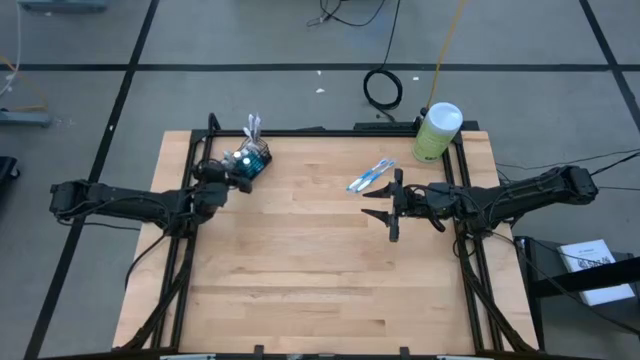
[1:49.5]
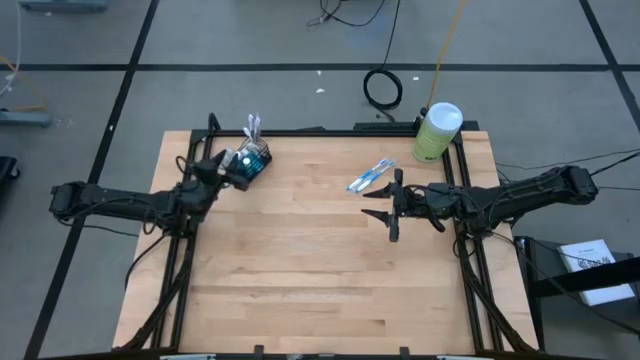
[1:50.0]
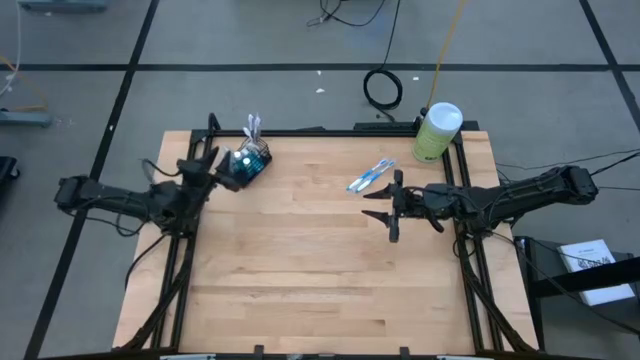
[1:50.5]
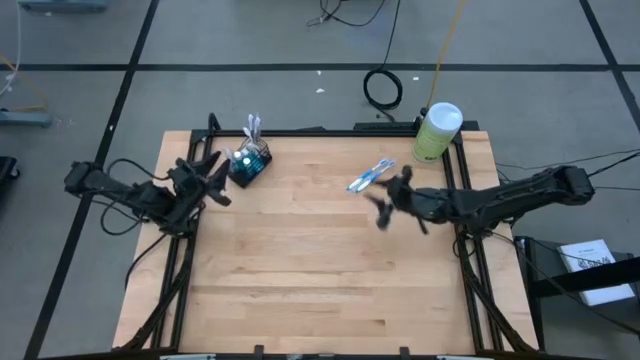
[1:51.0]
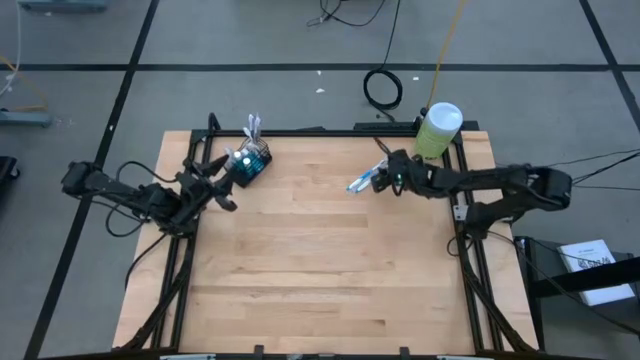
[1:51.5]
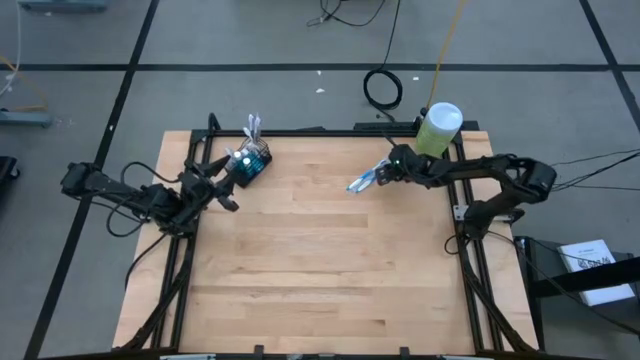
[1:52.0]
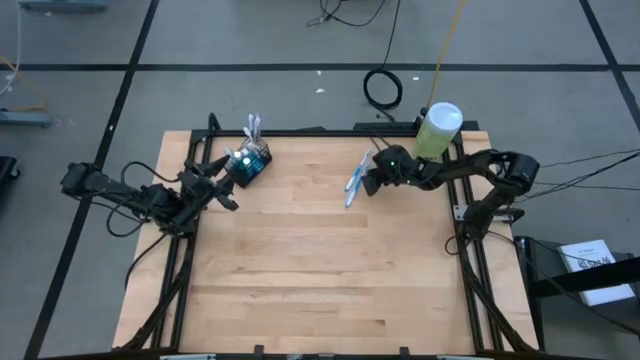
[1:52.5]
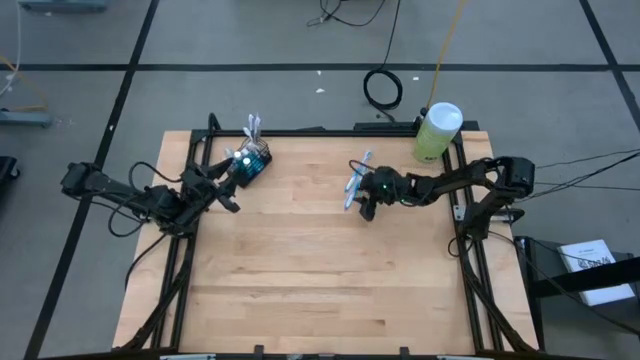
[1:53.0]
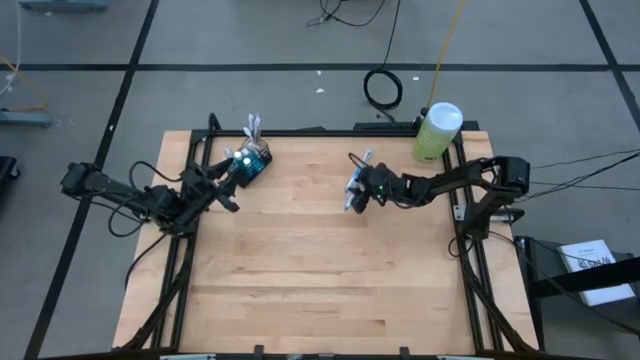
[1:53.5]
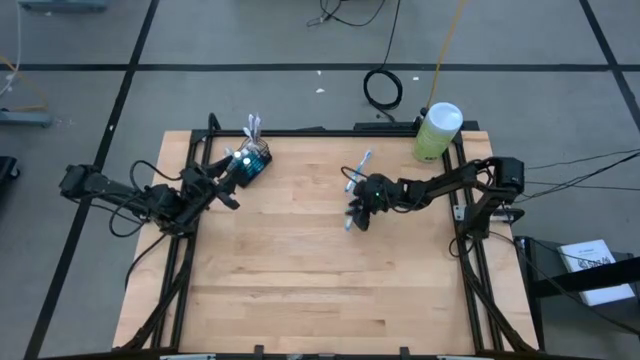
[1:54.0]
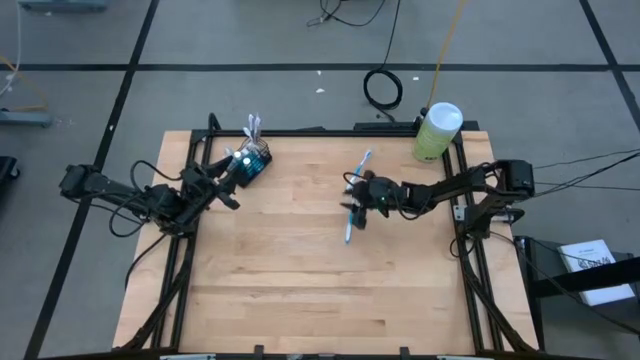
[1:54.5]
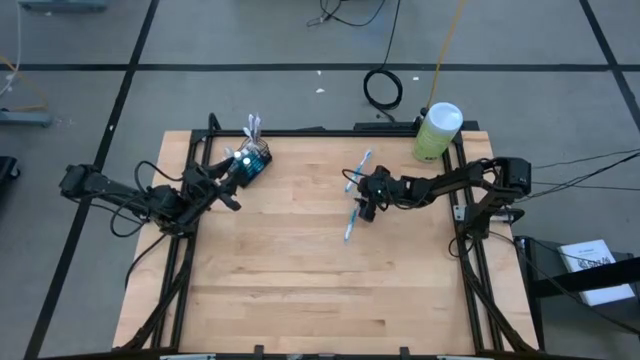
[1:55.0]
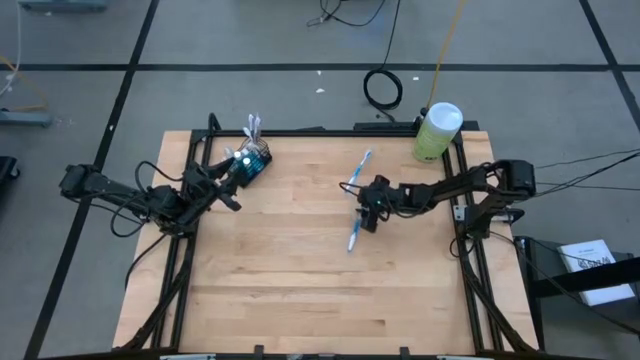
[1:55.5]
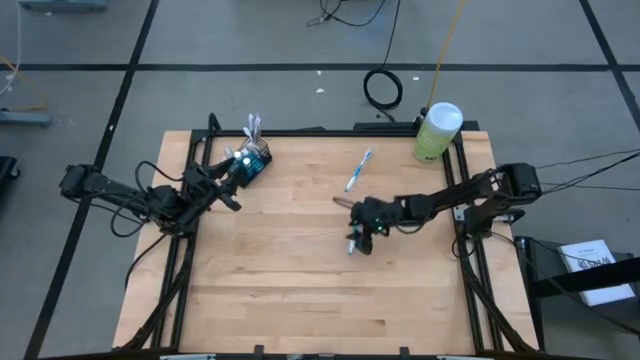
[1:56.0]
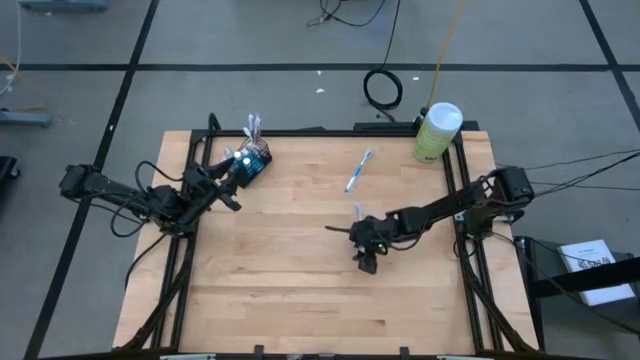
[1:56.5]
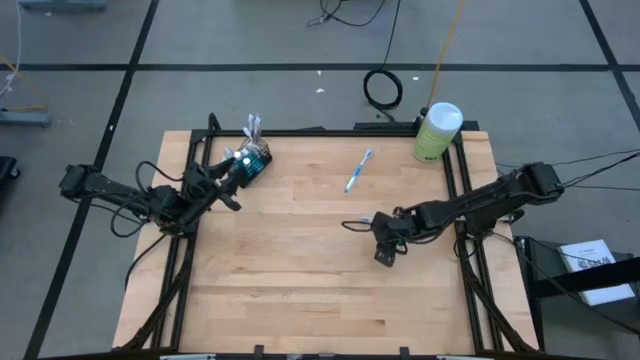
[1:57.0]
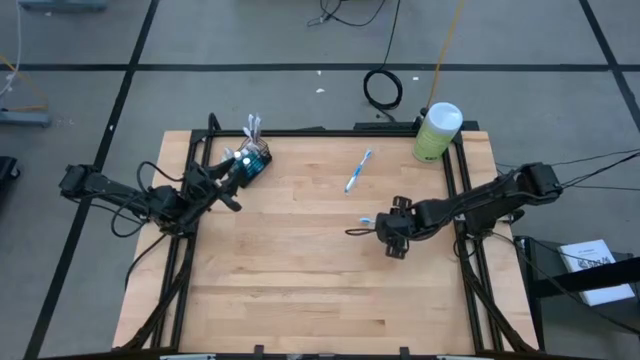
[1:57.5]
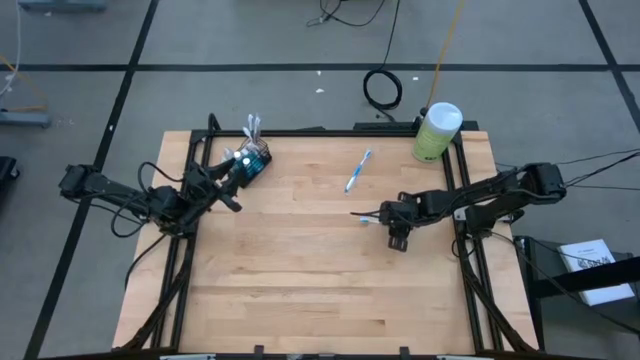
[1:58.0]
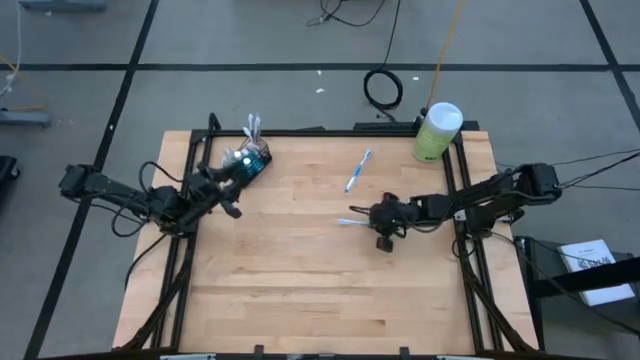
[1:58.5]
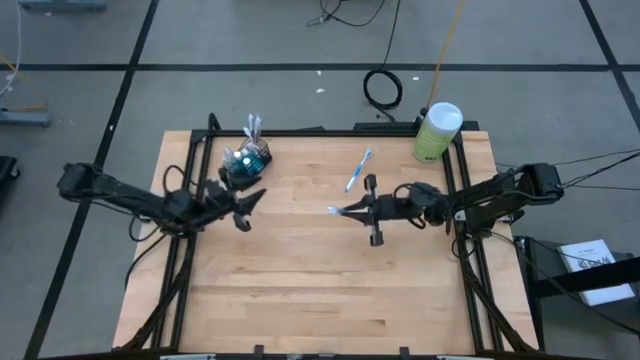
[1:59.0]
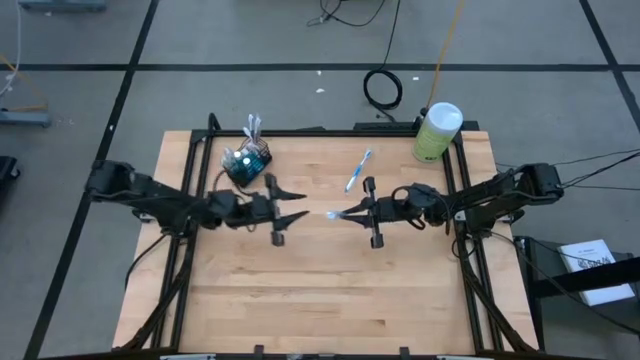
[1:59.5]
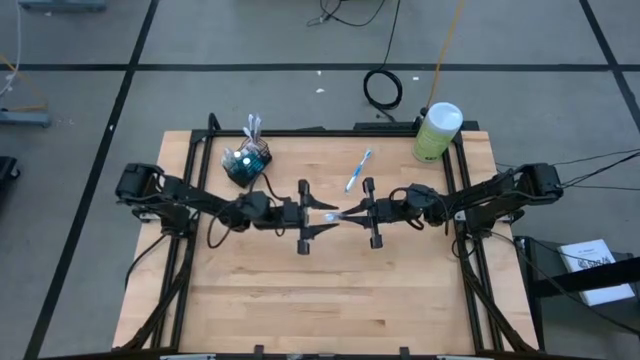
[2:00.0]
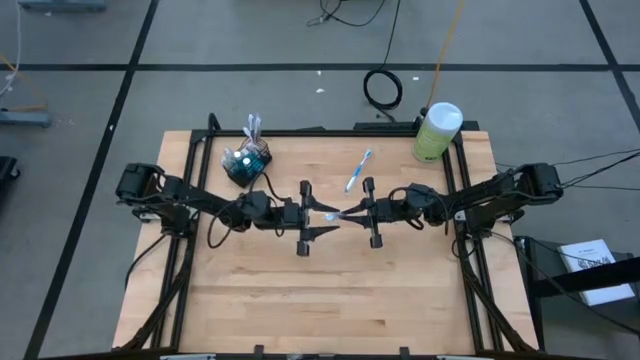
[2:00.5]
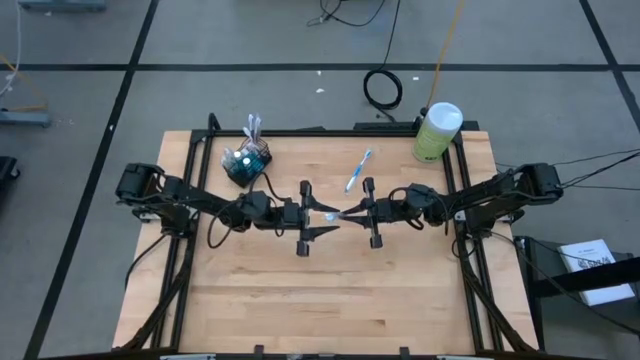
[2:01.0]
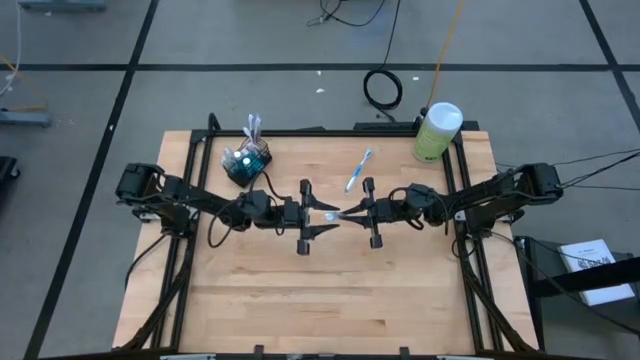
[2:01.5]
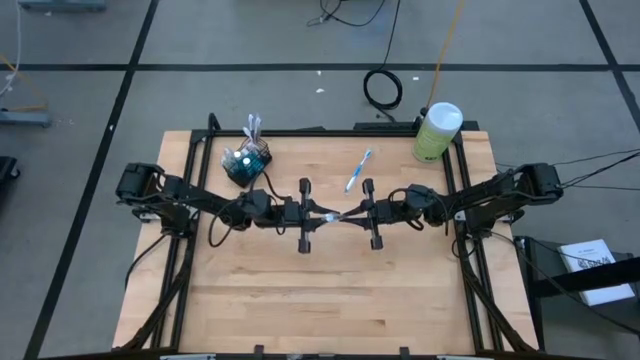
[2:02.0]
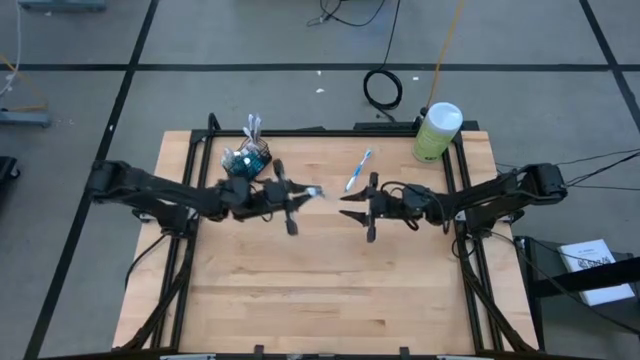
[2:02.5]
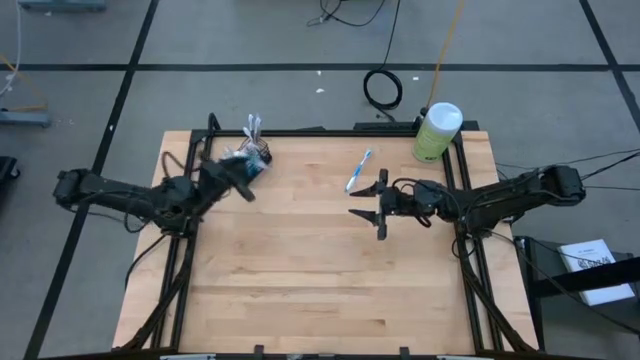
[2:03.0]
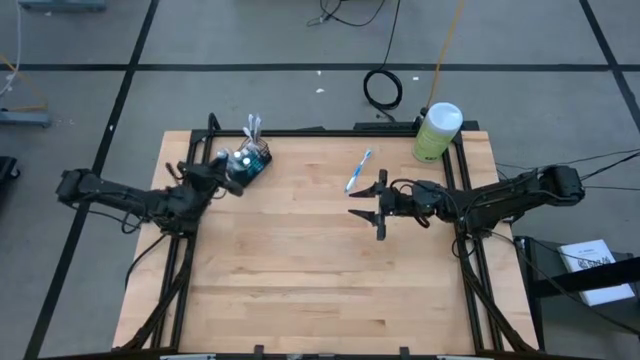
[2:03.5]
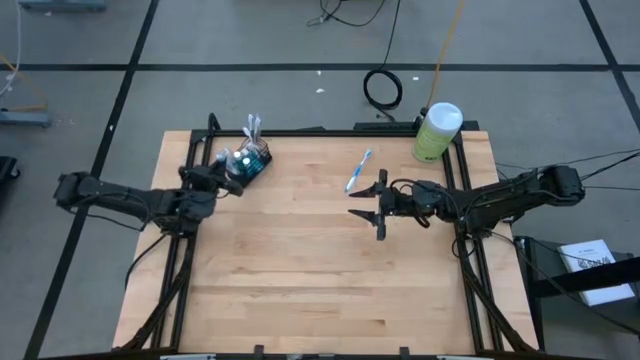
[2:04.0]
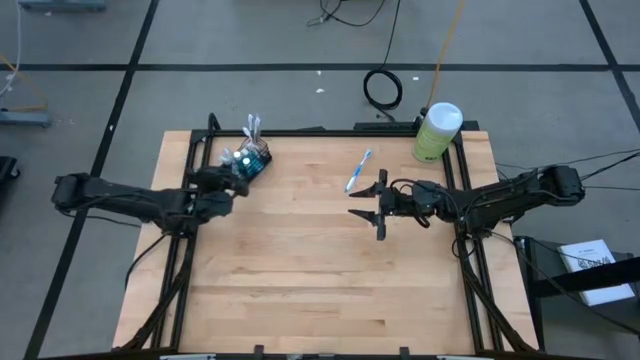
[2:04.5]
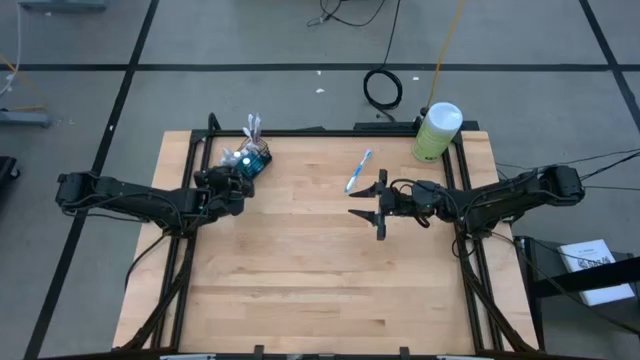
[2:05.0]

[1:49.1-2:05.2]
Task: Pick & Place toothbrushing station
Put the blue toothbrush into the left compartment of the wire organizer
